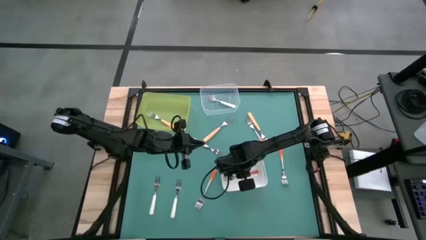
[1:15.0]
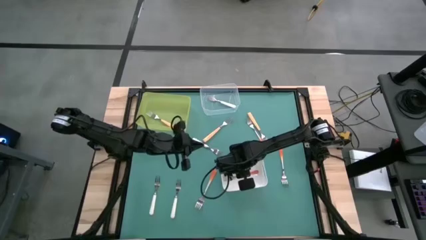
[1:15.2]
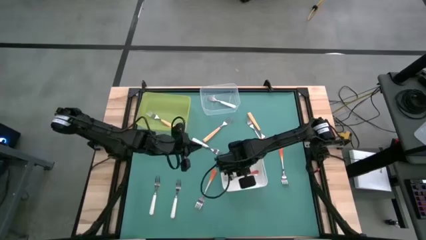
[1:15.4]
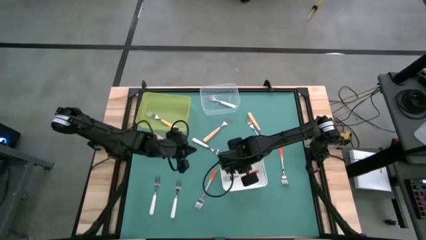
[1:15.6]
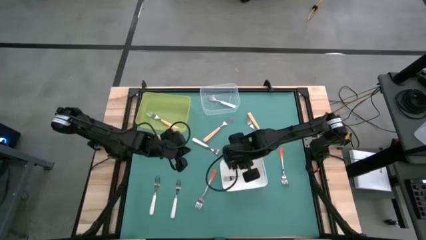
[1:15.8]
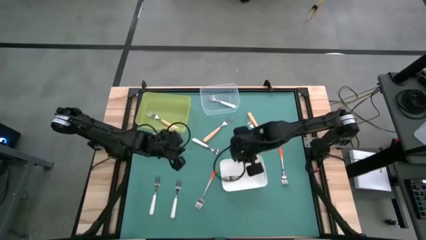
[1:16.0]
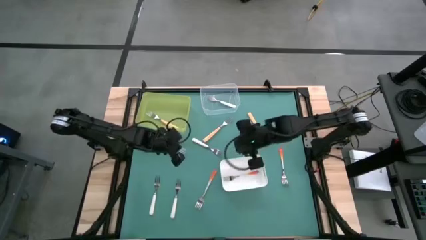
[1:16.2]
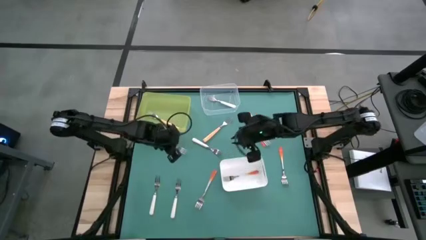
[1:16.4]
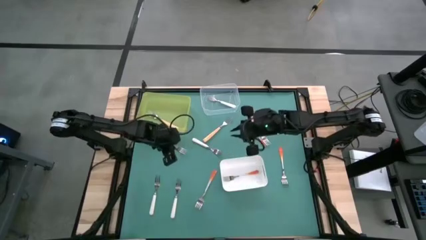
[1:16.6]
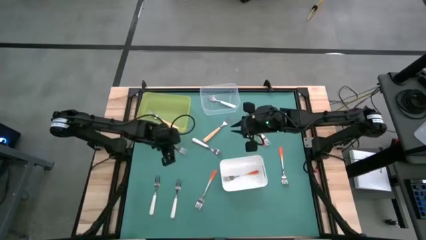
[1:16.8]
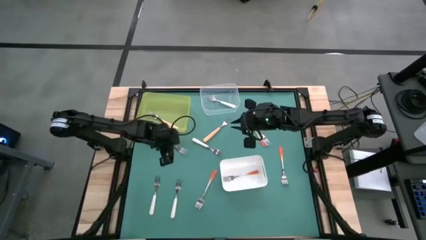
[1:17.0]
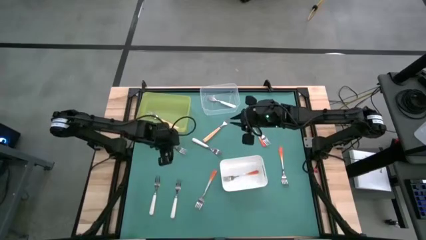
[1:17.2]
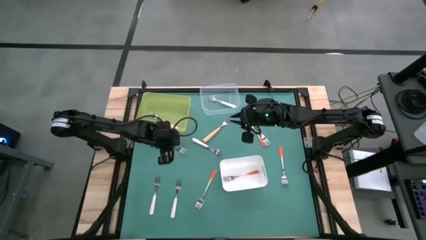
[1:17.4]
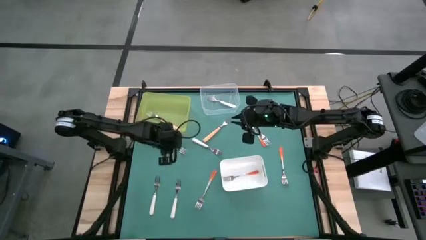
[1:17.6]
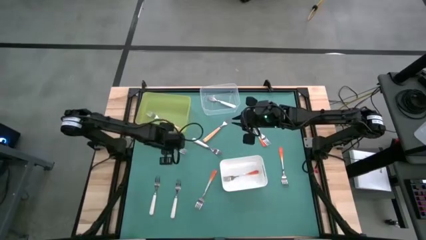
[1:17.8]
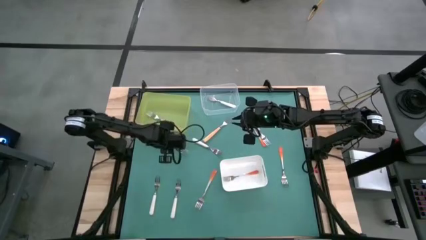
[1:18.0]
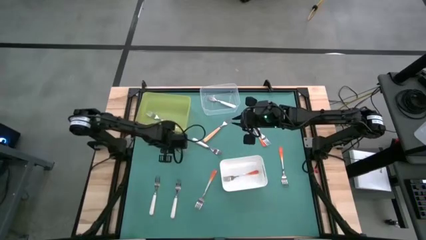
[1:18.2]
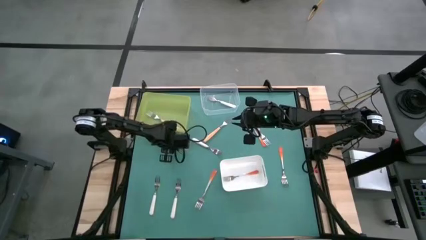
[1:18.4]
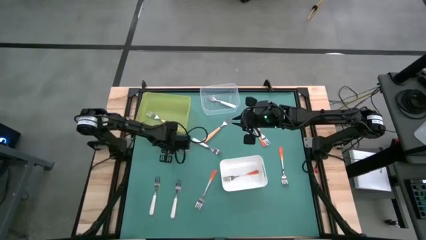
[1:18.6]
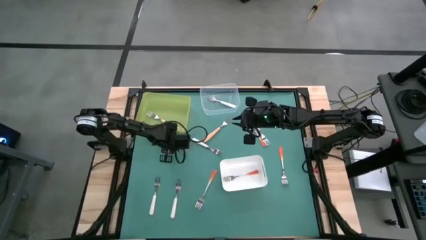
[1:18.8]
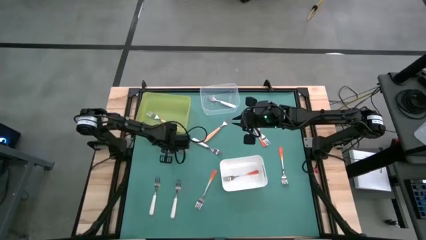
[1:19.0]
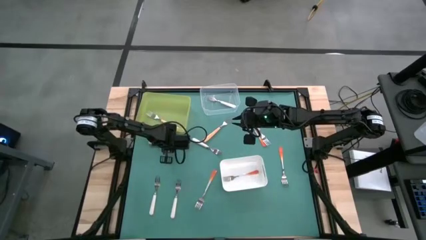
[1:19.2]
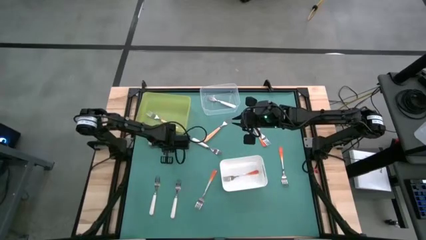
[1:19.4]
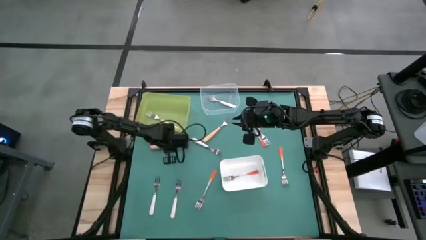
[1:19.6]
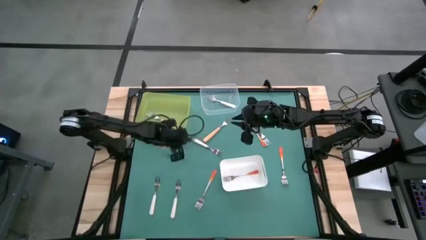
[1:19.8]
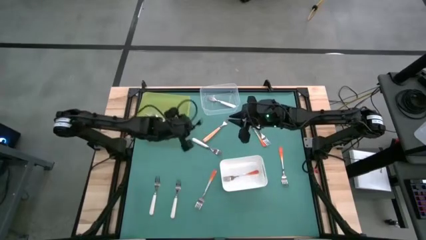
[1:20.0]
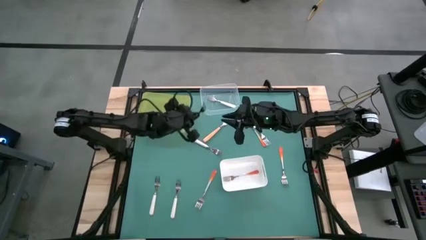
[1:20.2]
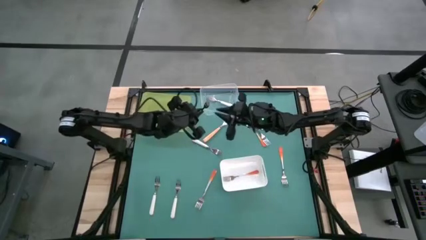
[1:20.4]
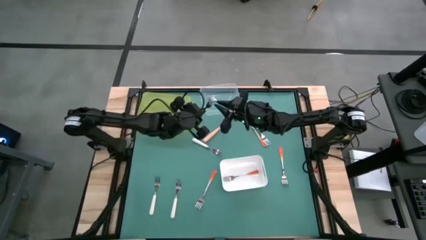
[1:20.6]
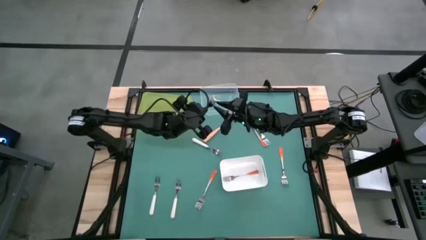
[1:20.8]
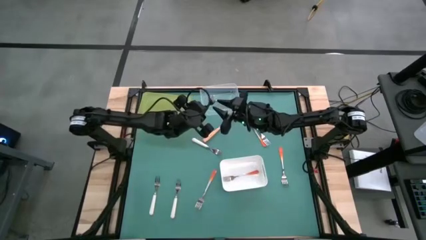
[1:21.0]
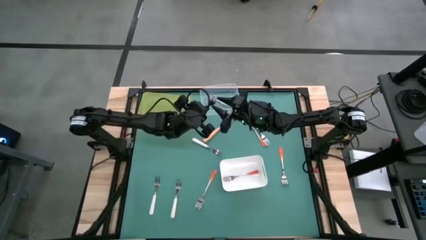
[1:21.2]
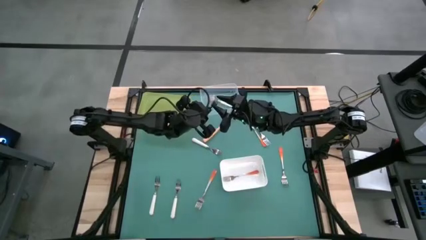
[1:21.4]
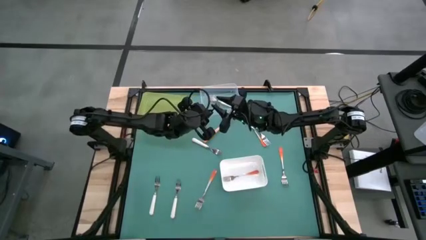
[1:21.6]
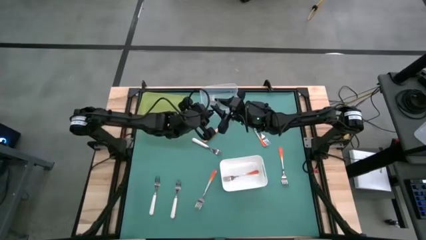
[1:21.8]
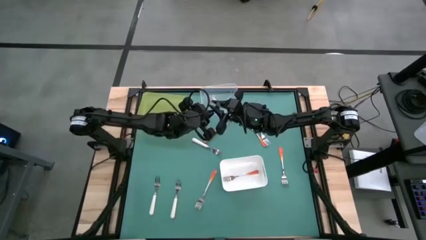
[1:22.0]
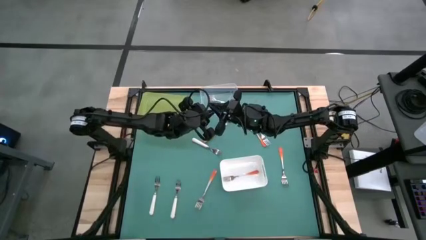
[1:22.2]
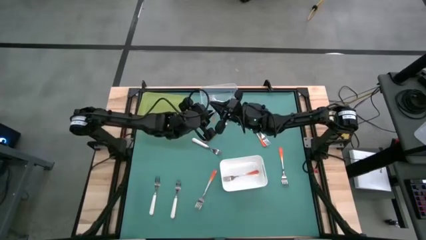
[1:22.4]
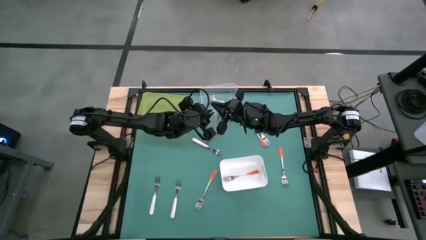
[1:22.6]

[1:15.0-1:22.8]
Task: Sort silverware by color (type)
Put the light orange into the yellow bin

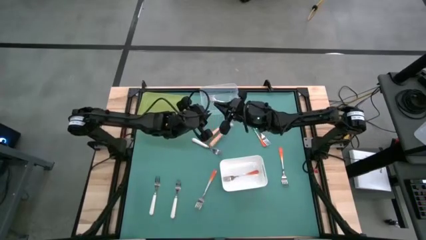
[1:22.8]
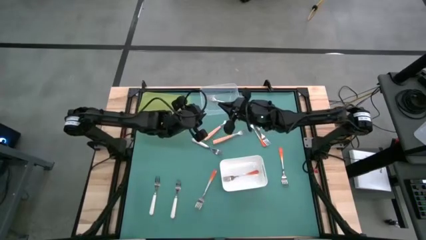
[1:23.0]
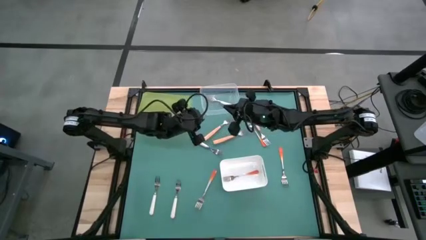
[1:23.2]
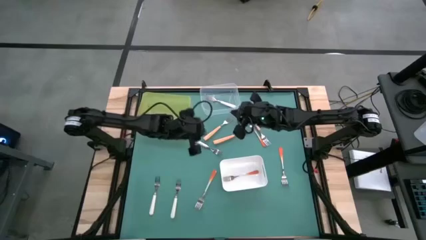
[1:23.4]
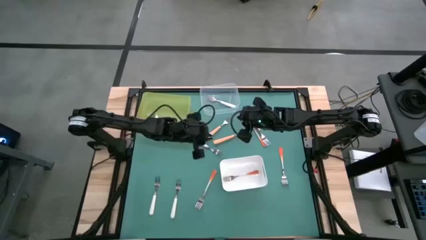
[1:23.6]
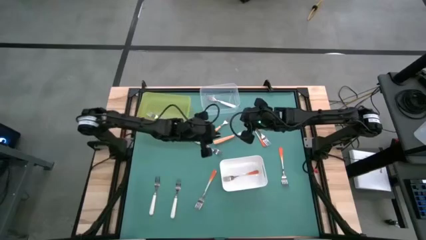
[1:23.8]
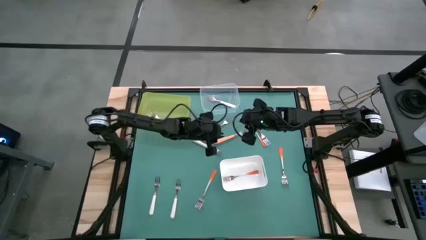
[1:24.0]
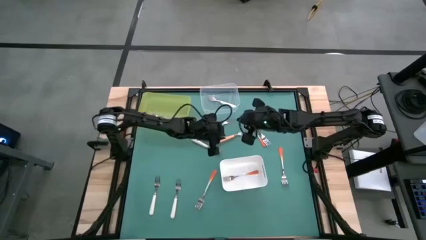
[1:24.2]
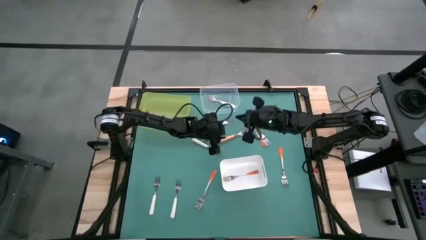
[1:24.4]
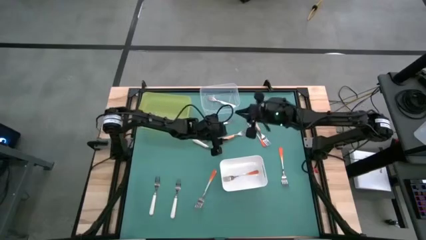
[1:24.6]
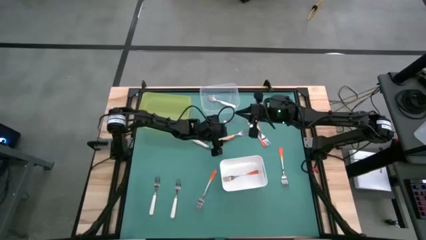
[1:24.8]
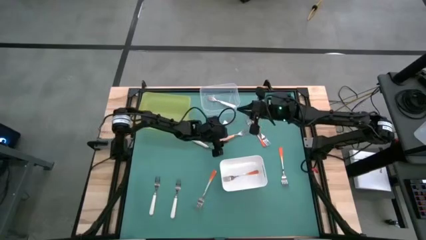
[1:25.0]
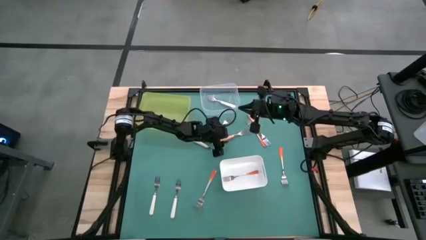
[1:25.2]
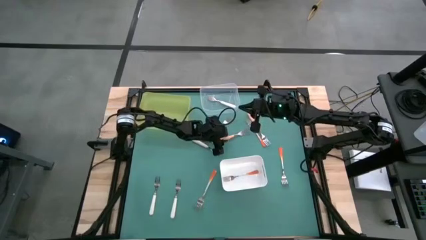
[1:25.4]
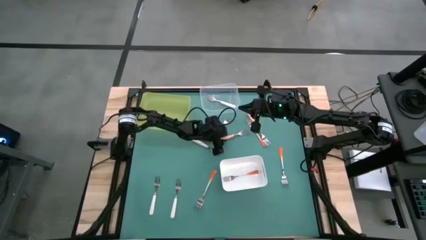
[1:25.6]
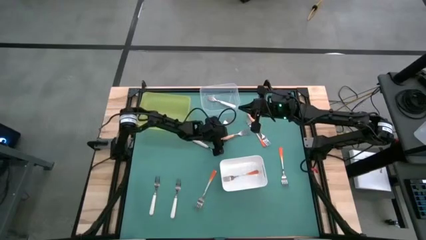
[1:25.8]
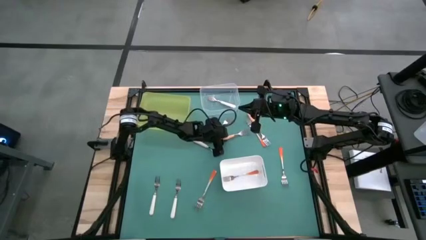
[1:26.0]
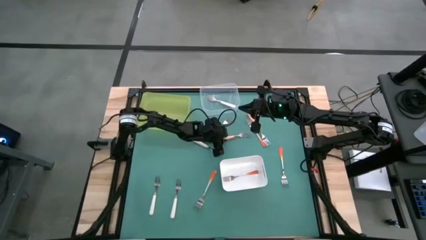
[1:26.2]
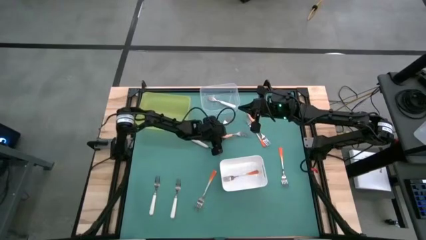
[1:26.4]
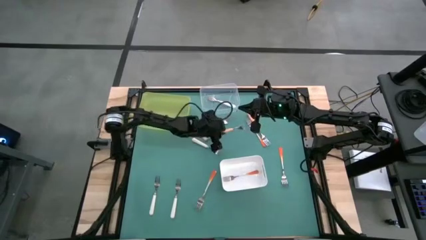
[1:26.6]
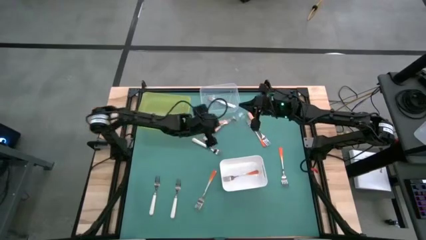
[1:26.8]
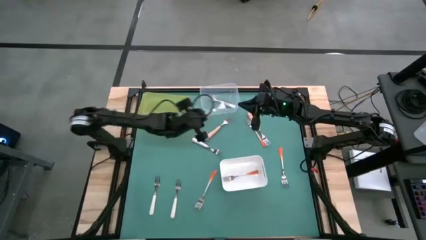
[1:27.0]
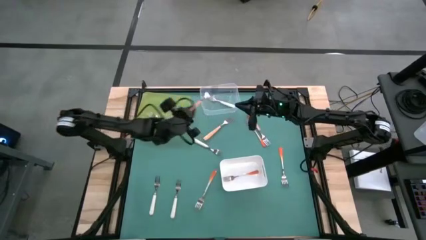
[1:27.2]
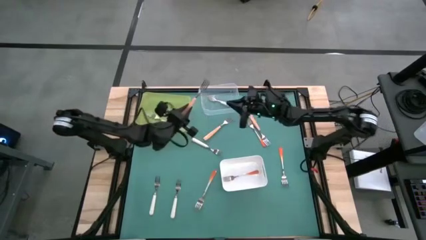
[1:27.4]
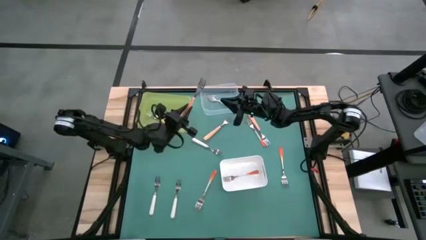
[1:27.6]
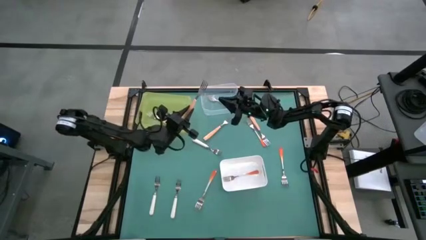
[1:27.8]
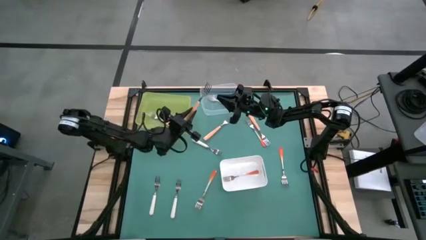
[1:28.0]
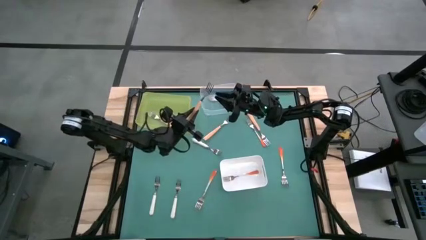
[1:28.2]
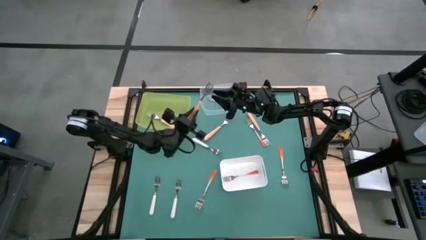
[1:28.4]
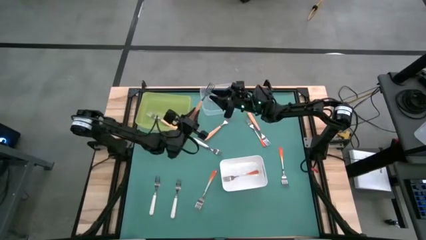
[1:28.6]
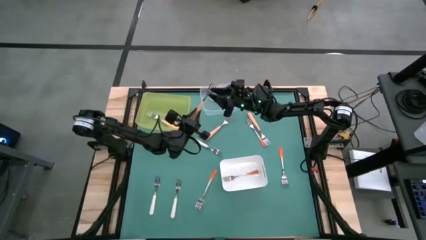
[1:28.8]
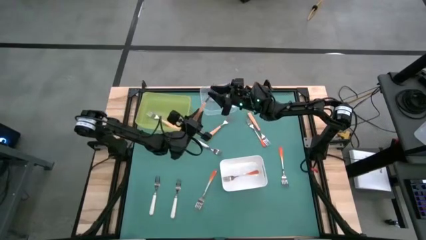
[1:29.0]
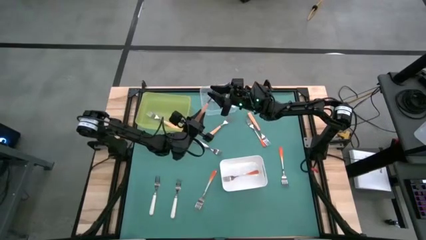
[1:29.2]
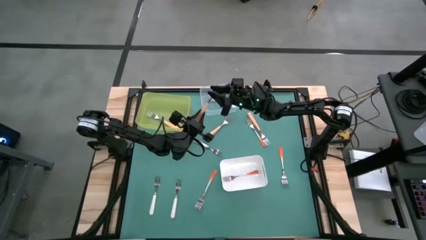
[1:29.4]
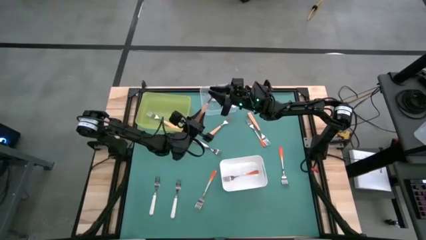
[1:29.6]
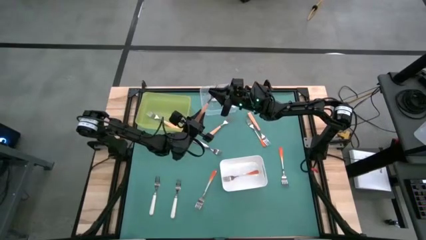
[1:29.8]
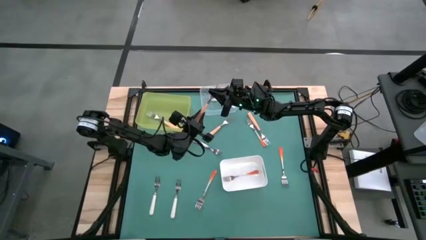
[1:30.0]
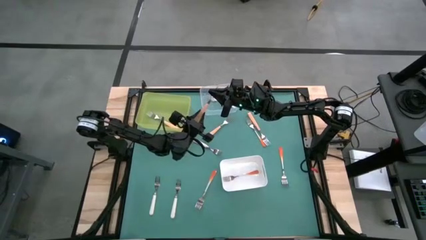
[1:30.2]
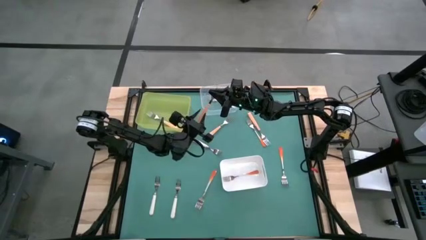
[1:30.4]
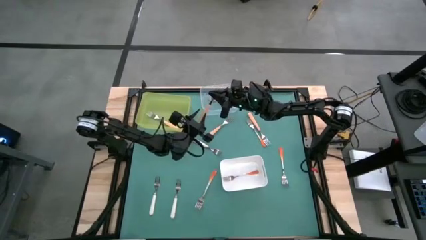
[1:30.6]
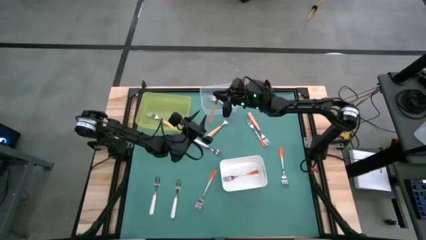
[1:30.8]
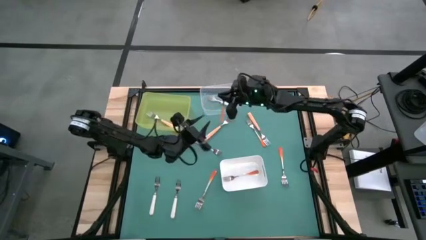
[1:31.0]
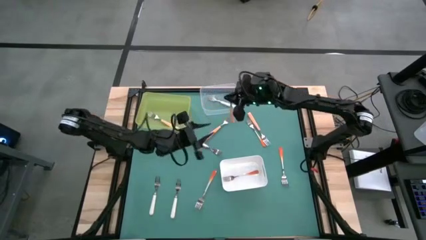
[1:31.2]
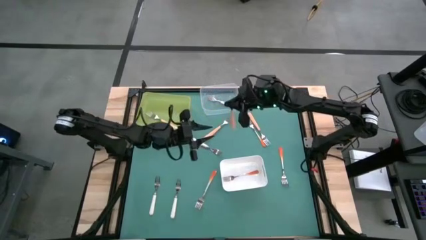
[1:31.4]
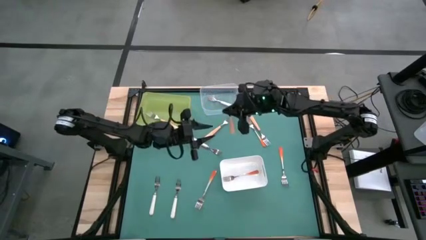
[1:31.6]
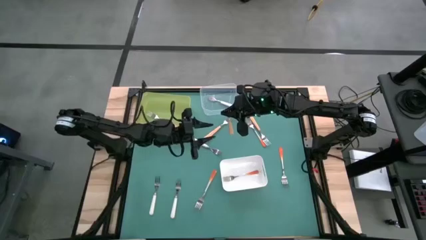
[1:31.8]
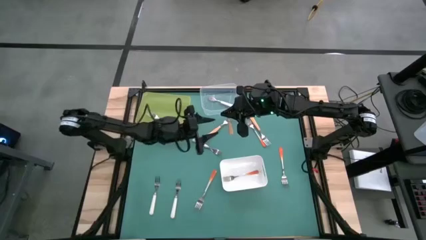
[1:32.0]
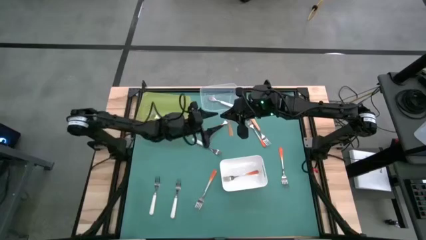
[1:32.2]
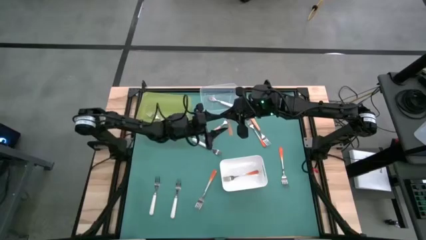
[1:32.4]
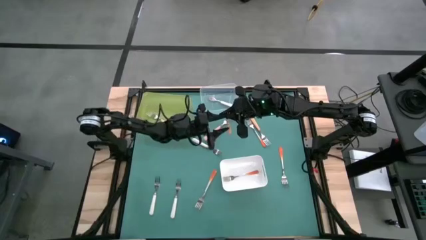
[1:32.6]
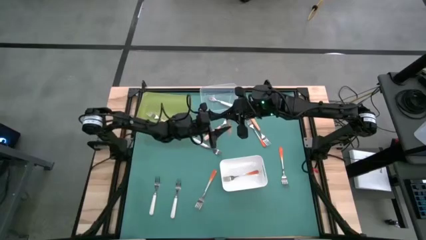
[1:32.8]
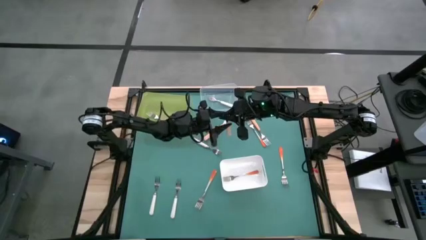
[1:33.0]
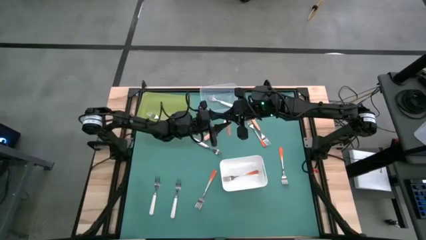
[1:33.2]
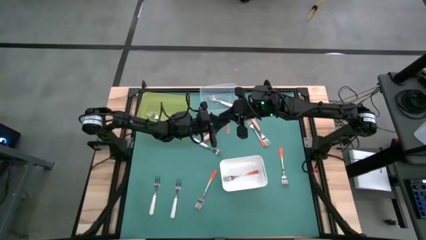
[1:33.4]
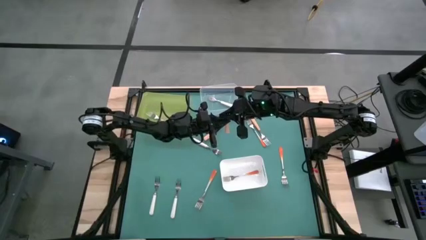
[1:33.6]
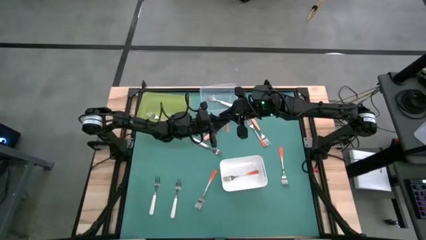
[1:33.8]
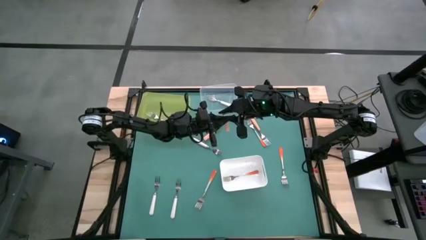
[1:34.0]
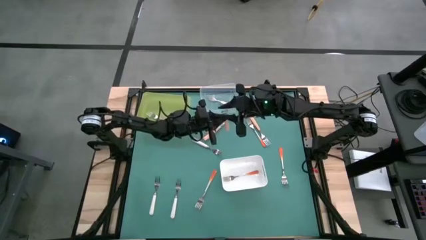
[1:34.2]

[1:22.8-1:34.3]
Put the light orange into the yellow bin
